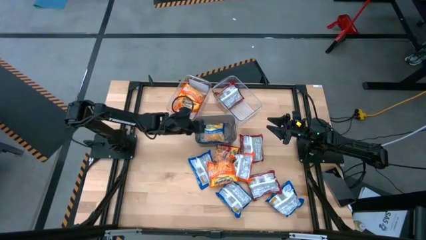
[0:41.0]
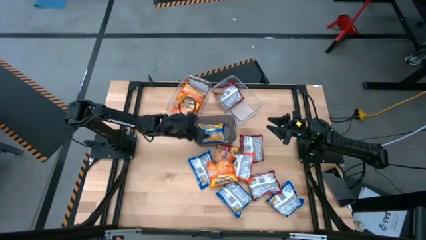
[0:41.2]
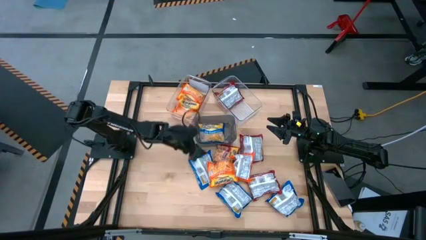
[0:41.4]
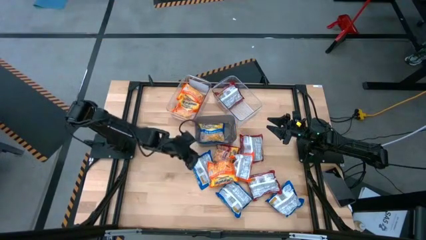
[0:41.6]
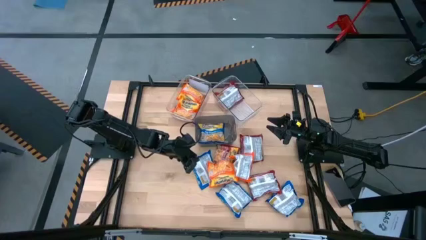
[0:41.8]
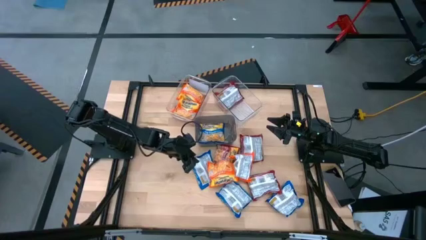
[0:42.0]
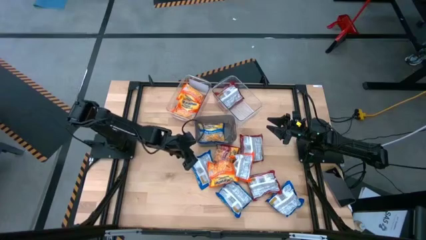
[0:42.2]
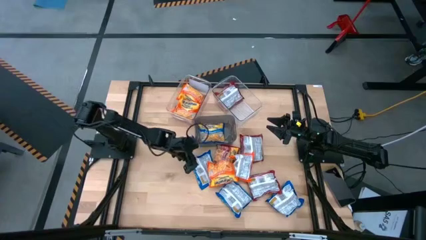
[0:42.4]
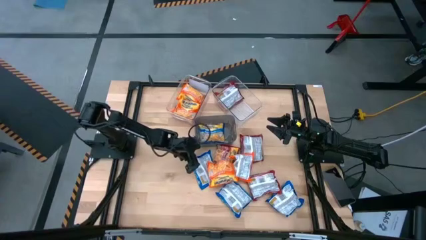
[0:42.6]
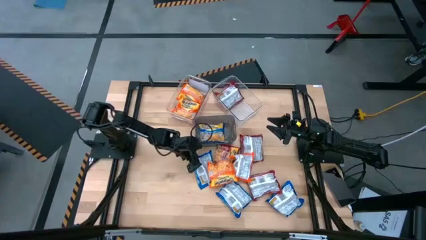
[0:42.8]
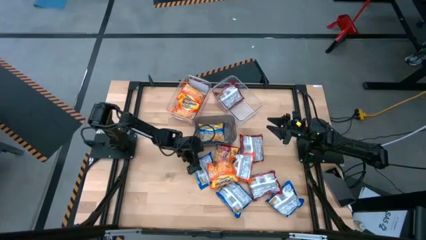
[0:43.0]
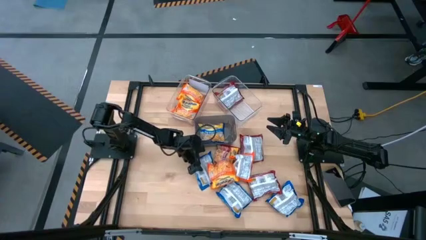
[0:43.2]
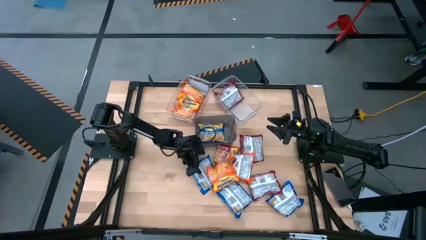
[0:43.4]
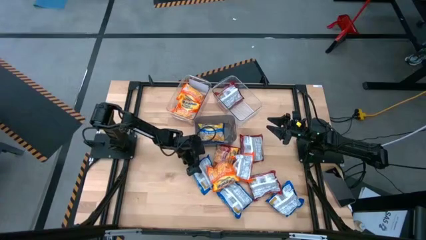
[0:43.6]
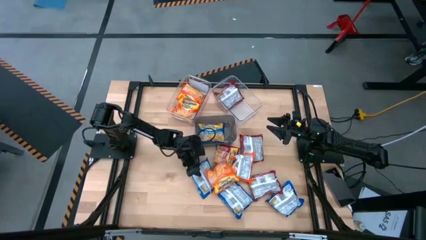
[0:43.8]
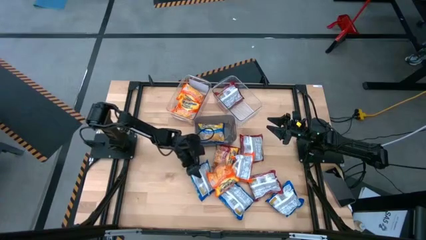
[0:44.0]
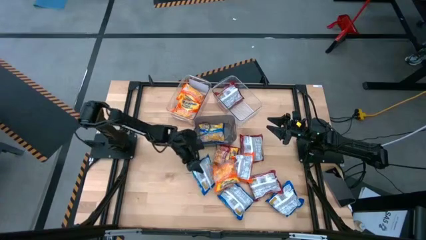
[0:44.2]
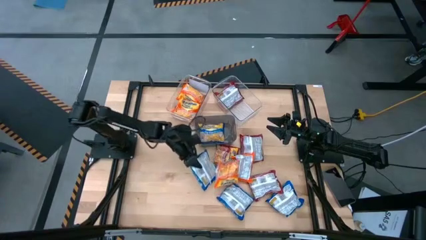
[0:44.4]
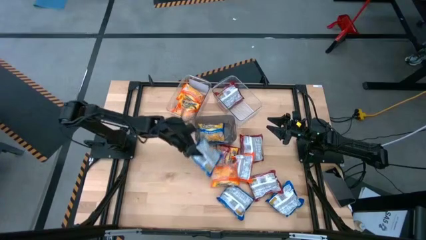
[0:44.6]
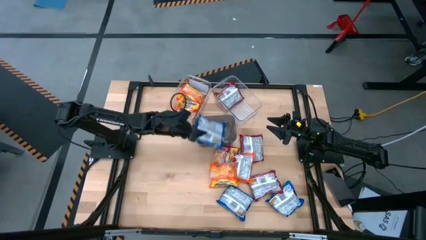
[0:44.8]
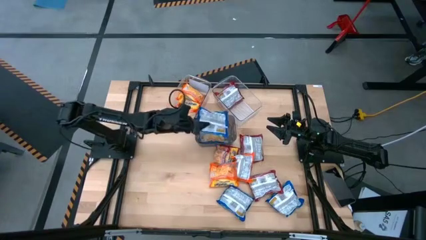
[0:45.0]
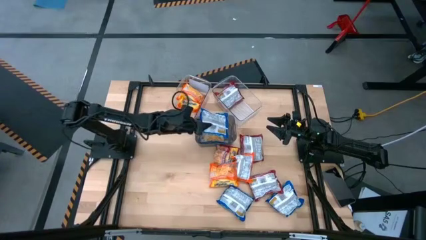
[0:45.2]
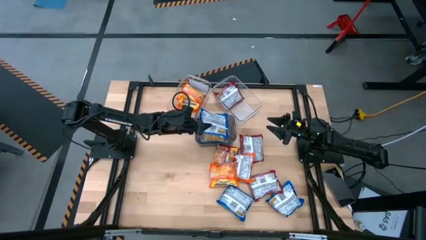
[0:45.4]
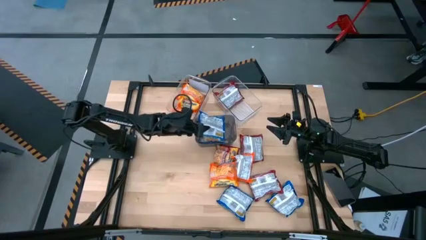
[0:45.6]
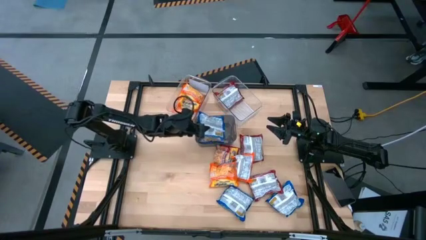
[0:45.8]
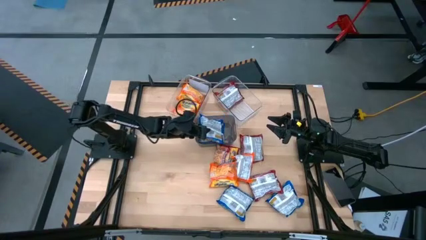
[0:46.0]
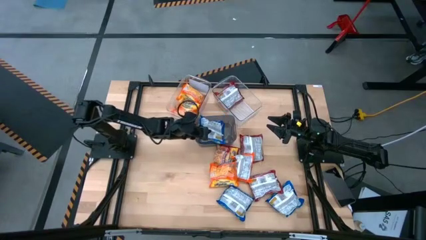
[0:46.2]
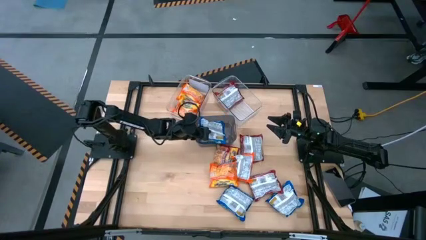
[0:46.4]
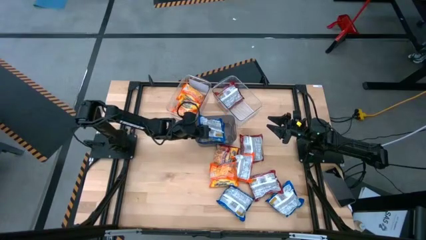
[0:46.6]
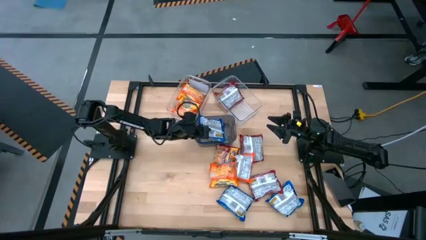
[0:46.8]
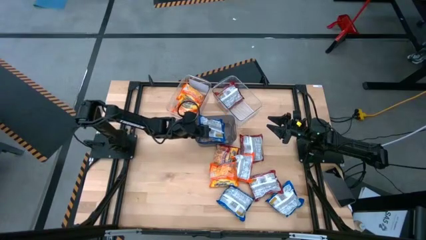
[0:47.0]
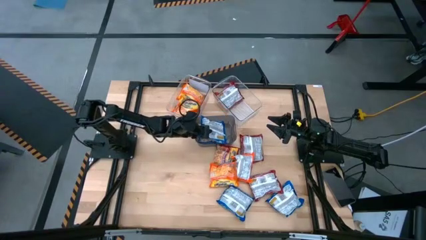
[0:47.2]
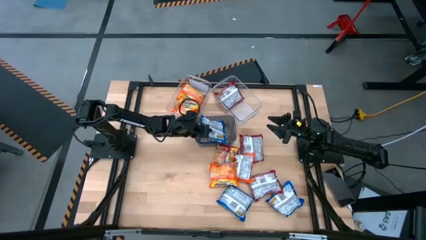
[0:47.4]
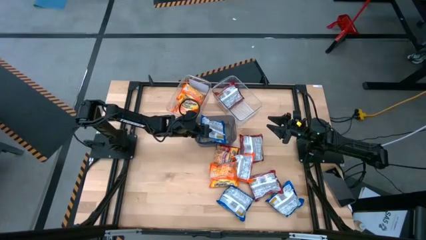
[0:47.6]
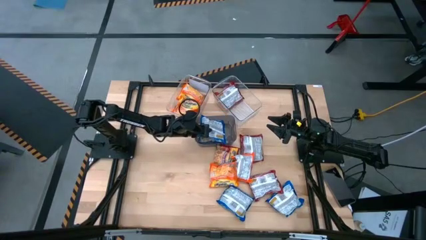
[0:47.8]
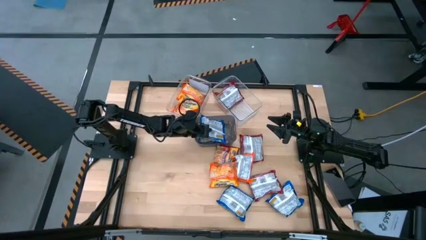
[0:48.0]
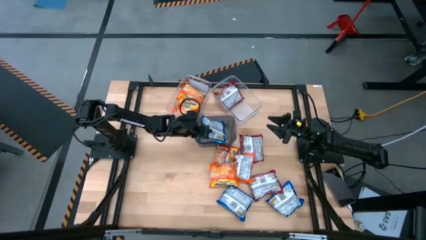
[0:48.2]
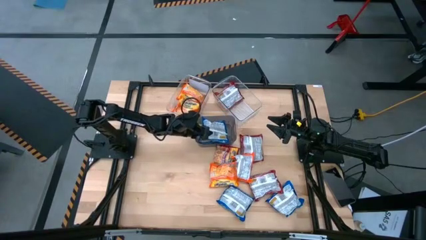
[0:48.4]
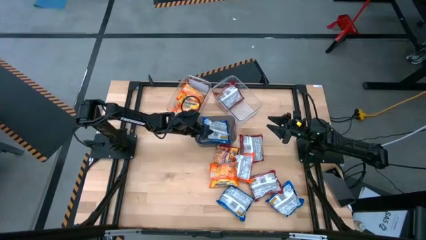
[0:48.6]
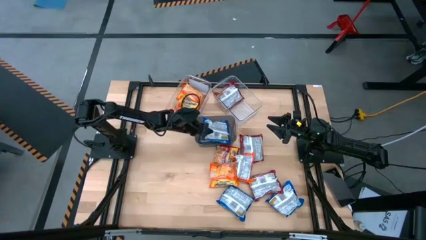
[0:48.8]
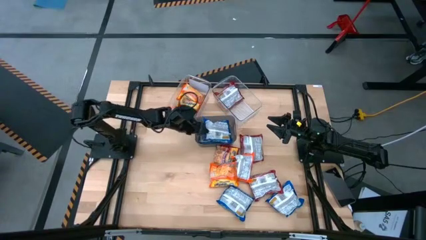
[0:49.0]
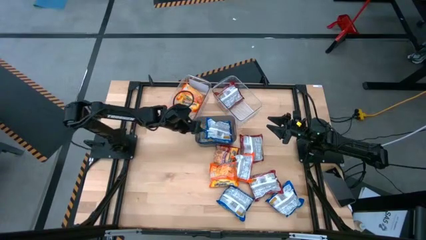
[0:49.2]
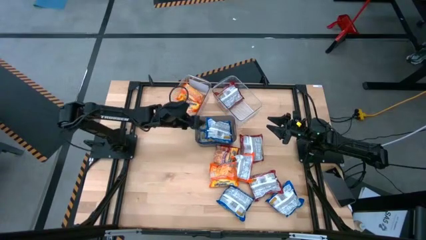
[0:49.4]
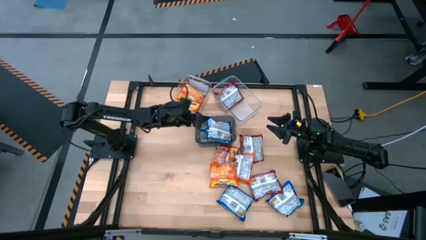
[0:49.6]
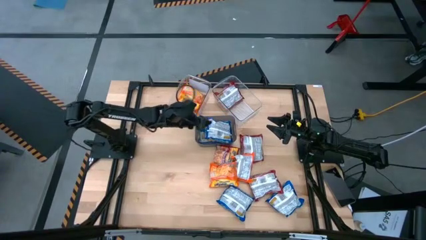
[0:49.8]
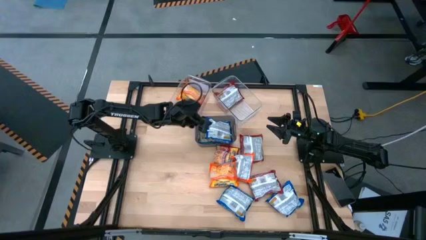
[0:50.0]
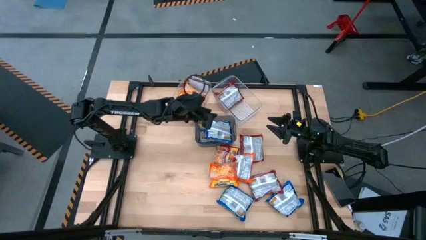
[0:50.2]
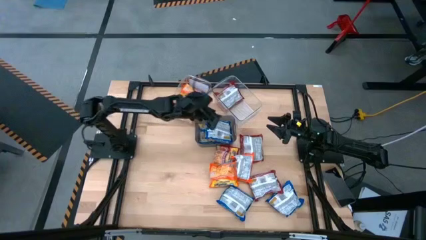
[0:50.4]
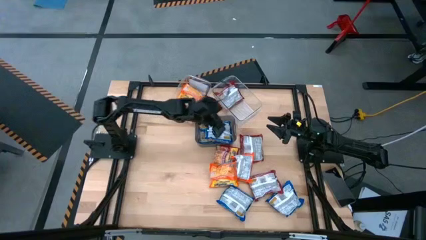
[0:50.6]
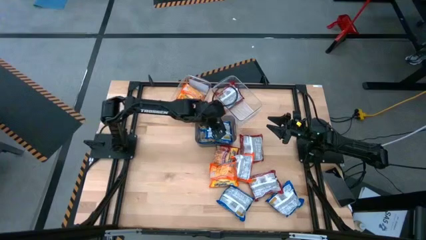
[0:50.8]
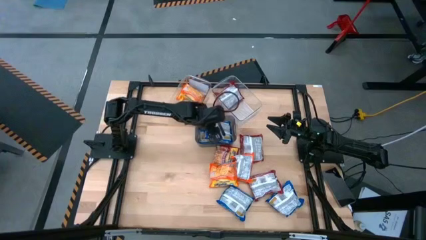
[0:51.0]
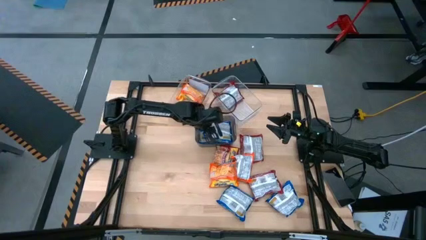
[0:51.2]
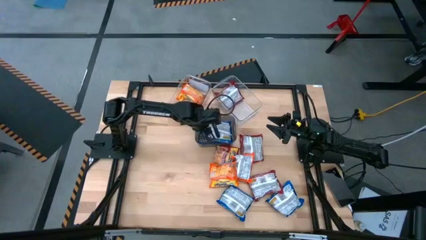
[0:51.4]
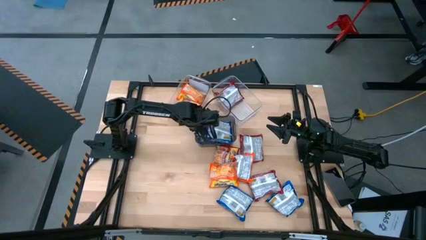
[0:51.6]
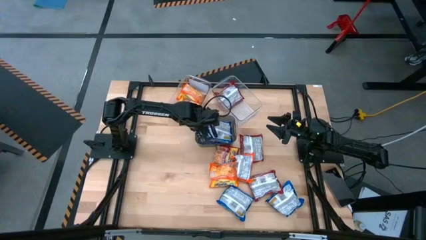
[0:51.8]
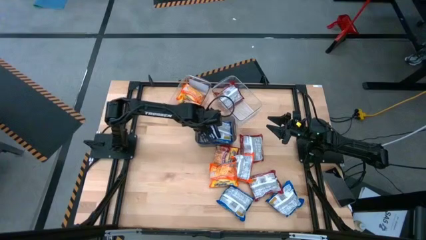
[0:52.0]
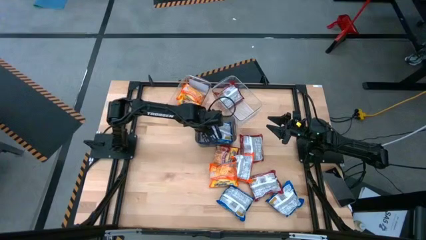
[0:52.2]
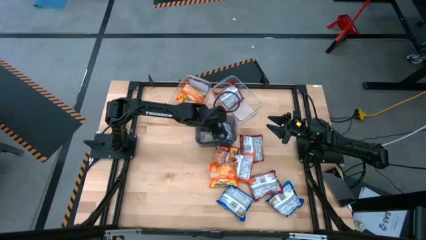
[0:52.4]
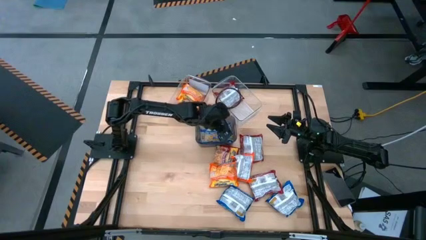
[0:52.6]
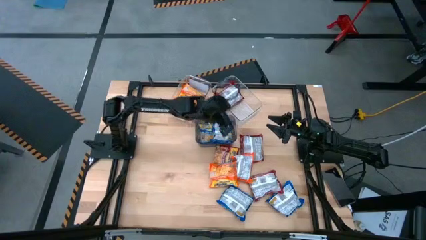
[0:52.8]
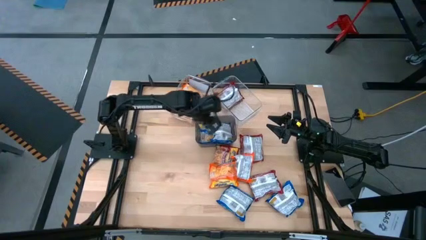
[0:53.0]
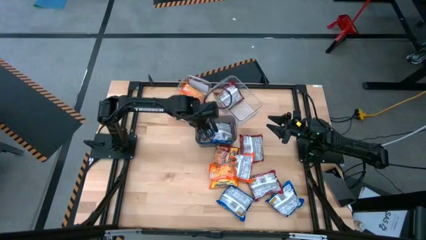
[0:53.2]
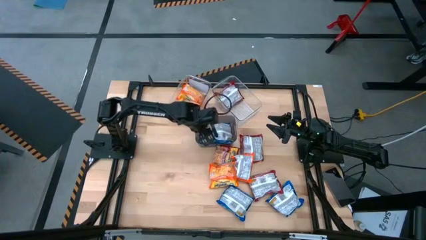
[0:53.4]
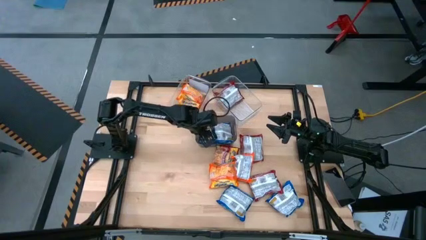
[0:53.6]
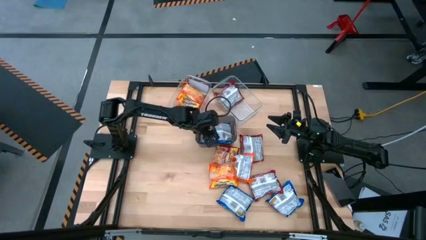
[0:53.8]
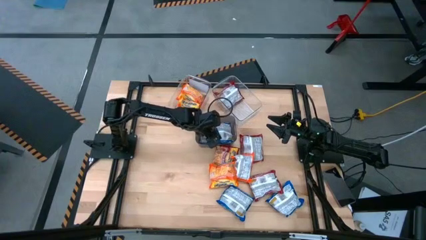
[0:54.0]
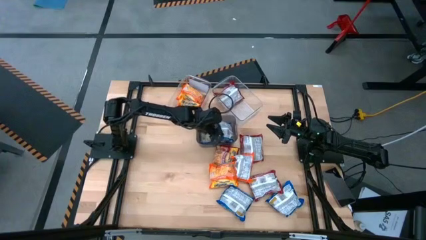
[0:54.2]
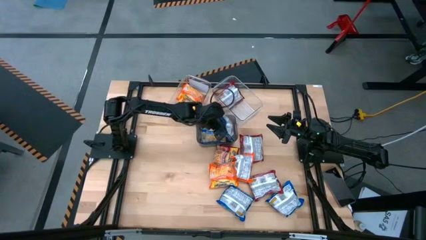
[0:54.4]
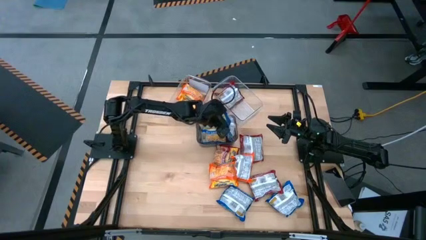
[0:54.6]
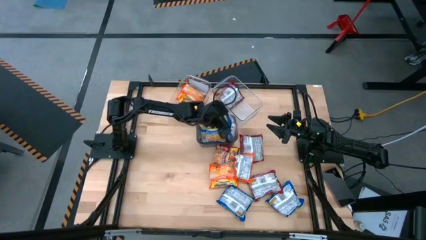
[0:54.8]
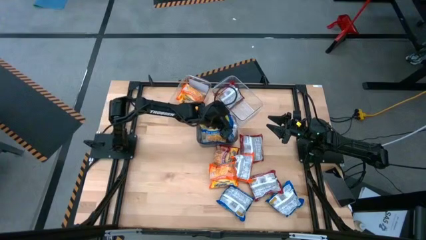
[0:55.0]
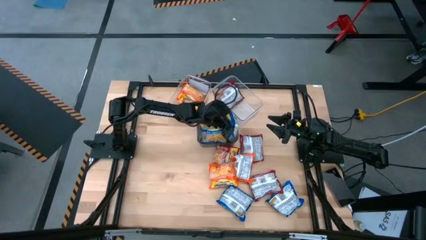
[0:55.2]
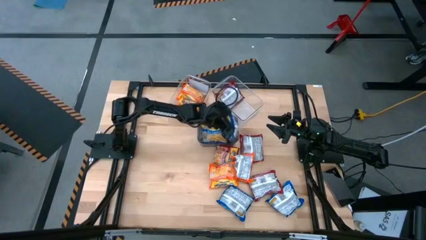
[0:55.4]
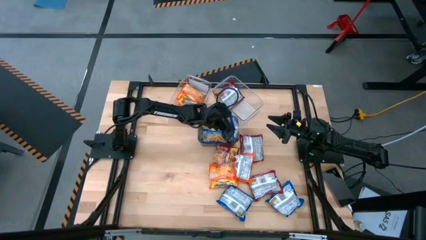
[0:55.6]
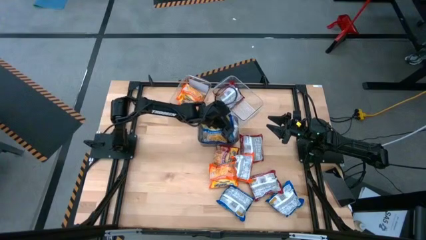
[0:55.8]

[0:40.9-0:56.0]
Task: Sort Maruchan noodles
Put the blue noodle pack into the black transparent bin
